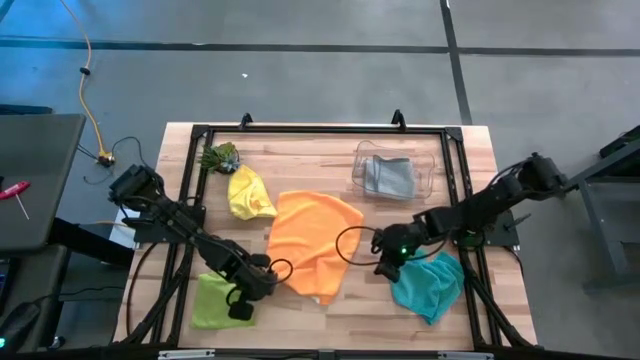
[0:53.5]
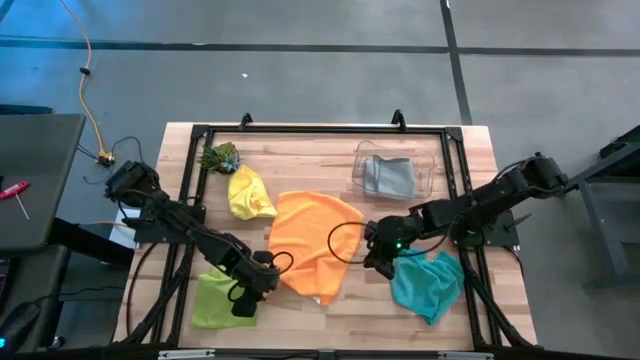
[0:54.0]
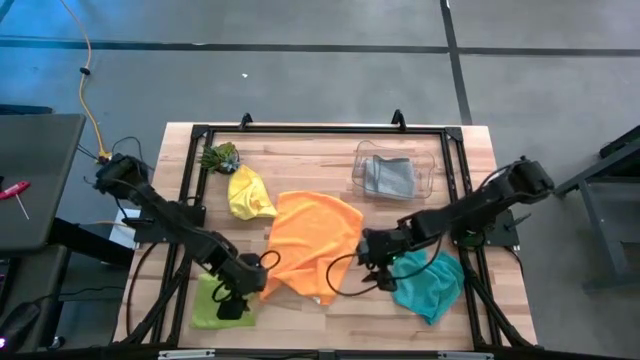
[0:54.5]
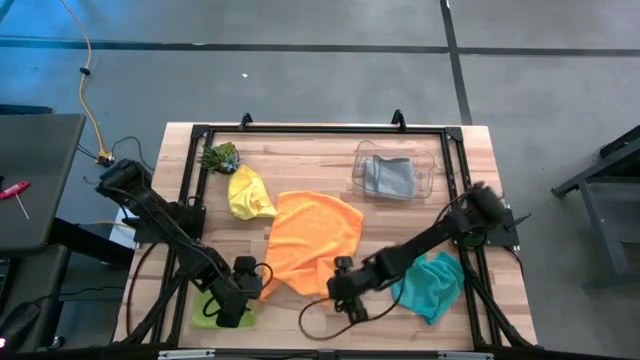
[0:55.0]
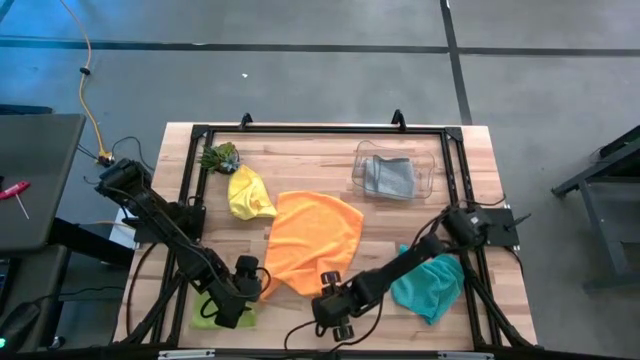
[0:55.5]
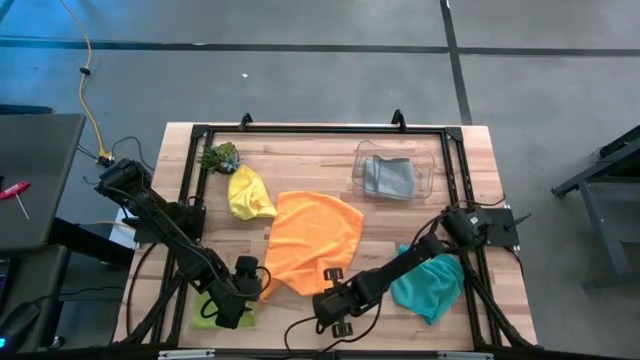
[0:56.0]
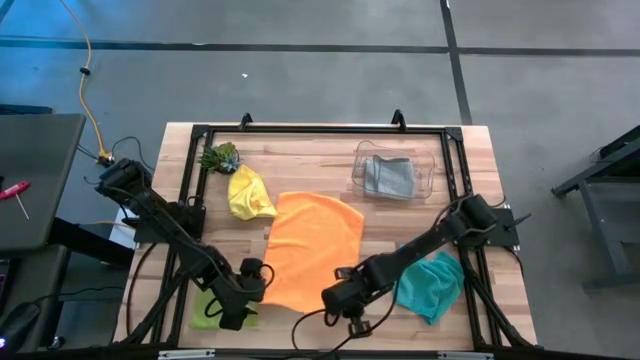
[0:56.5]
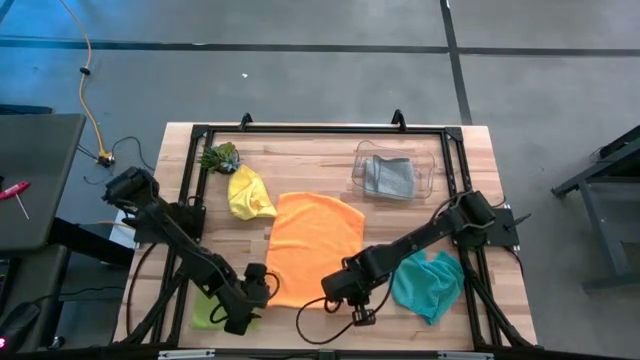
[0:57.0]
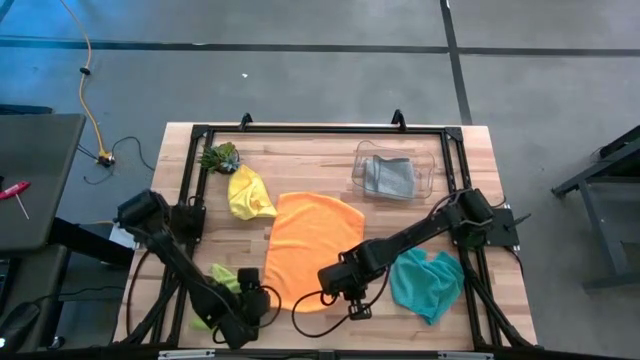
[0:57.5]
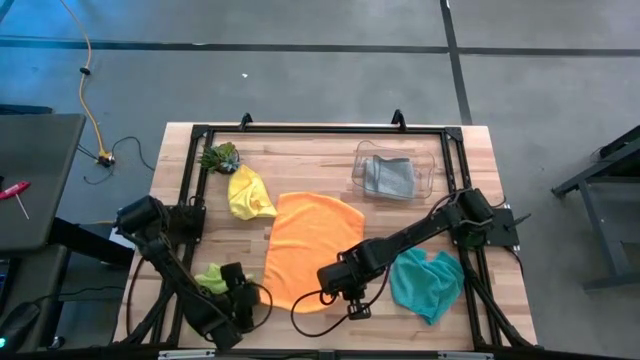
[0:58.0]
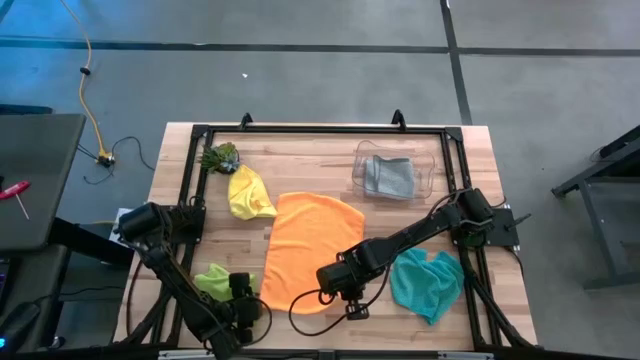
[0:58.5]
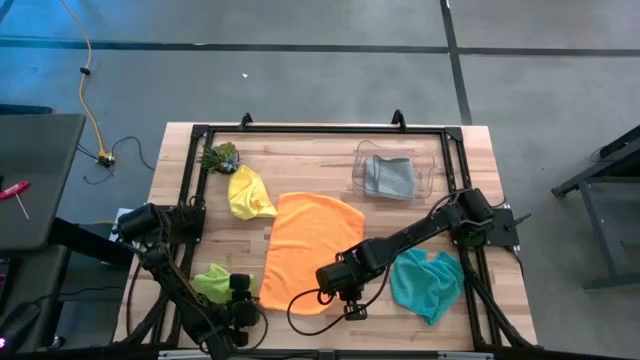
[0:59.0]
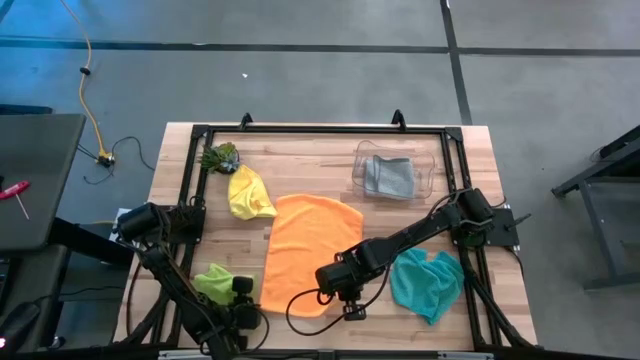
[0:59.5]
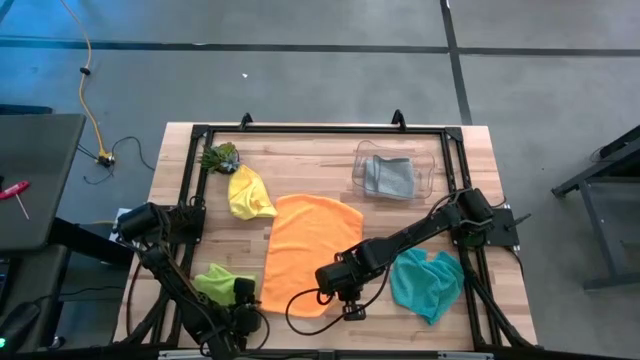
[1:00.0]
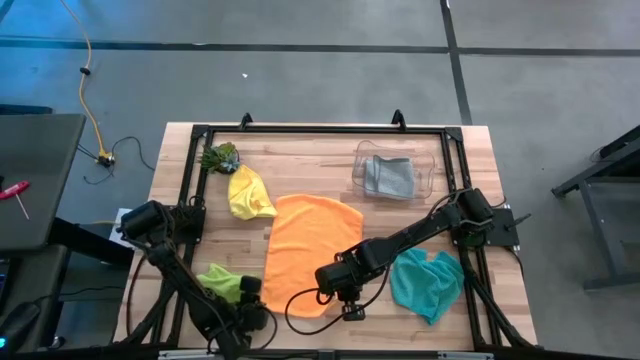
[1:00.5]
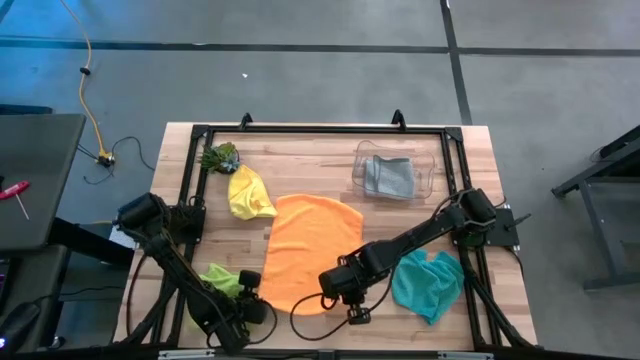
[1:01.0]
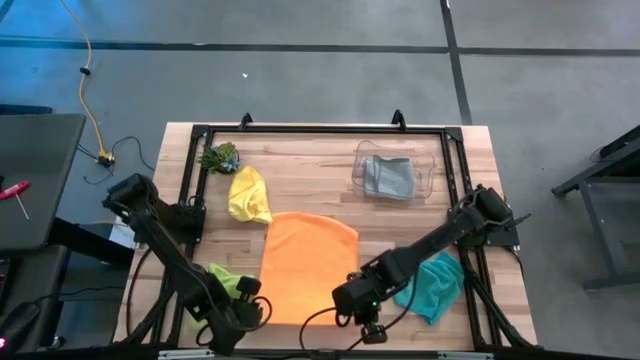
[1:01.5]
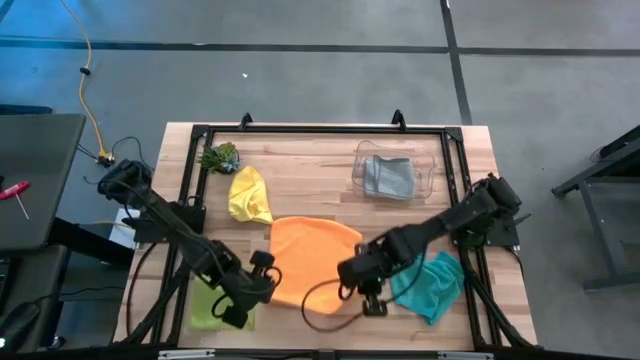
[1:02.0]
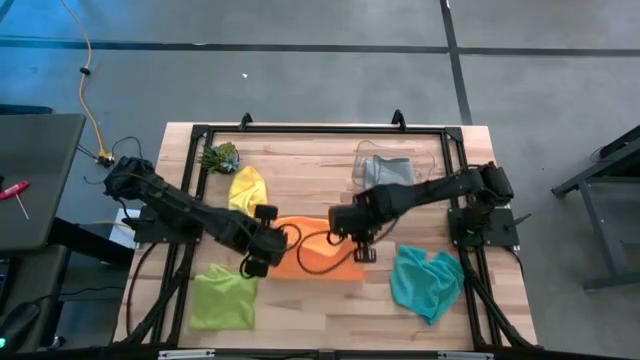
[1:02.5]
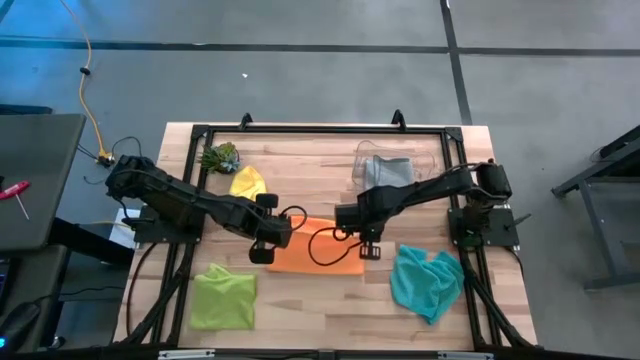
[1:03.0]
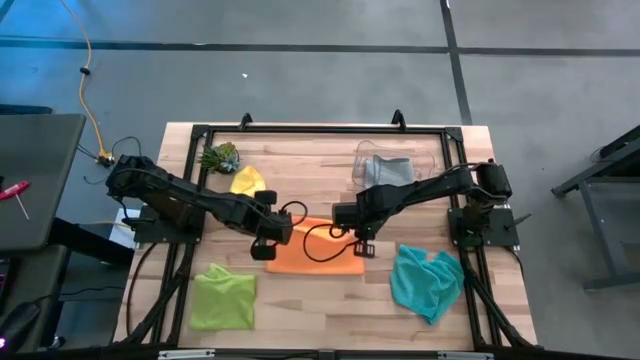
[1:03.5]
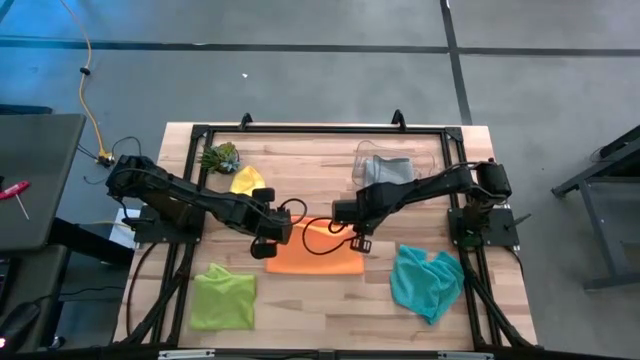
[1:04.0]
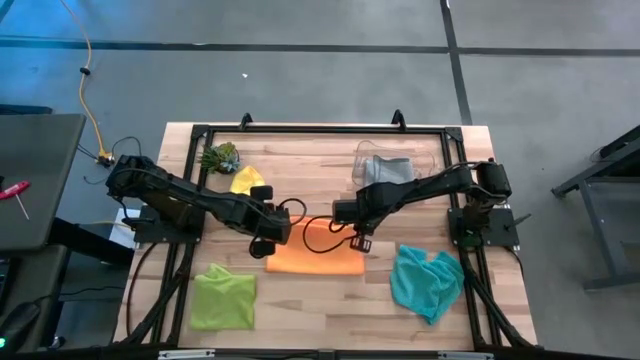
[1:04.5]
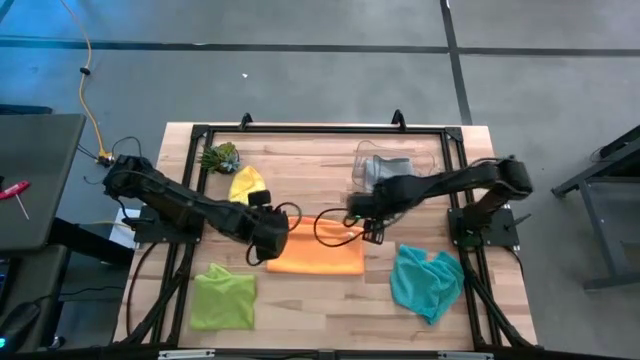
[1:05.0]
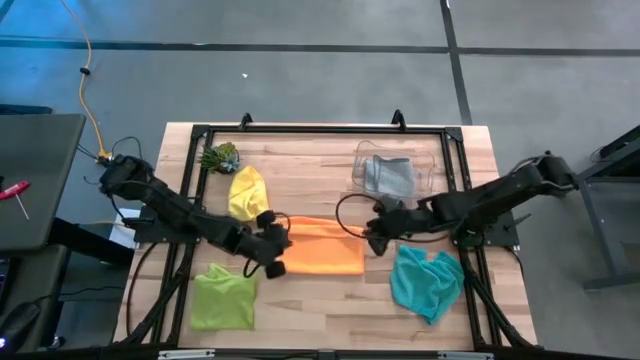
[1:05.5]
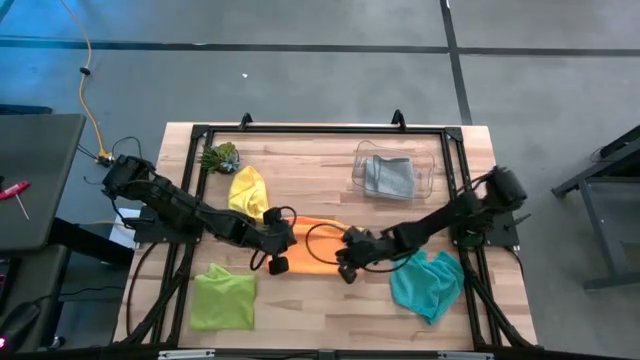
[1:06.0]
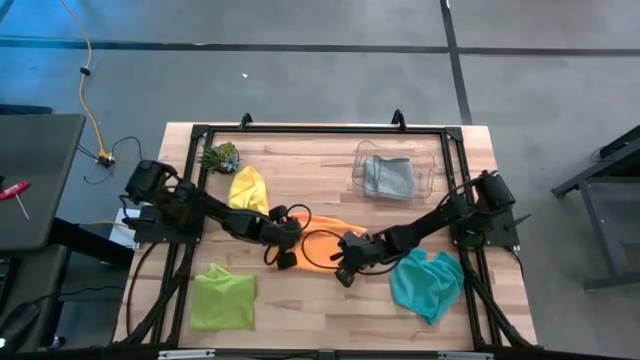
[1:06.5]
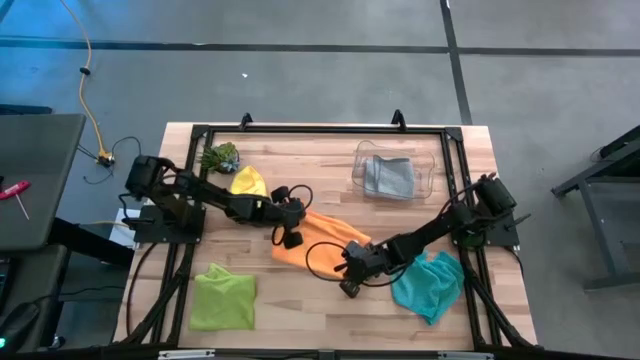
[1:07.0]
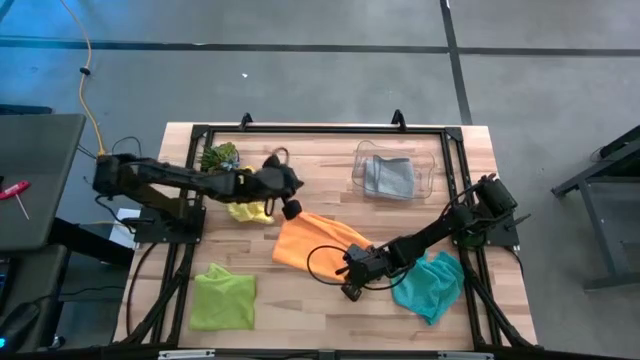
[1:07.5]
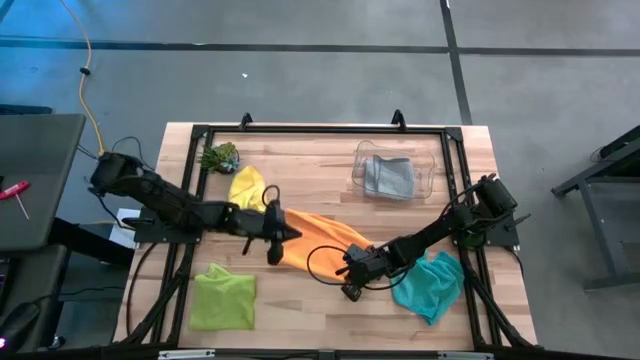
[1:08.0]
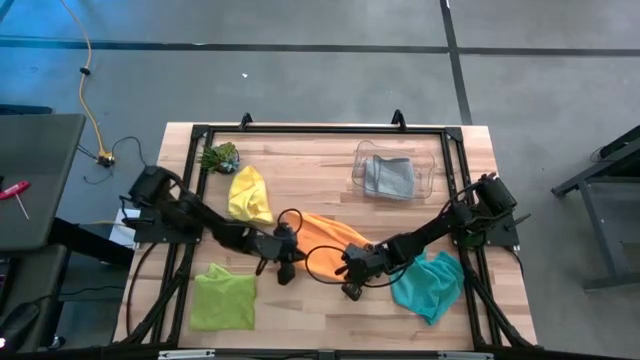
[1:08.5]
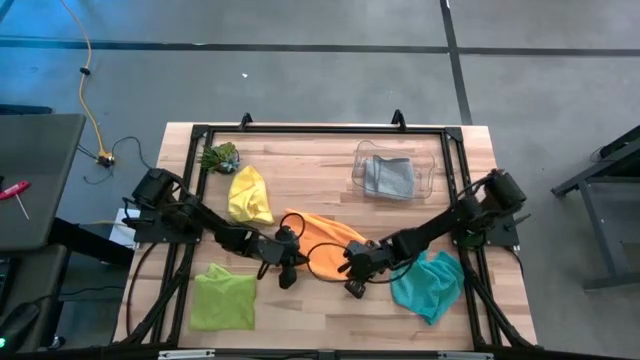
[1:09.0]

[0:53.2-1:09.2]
Task: Fold microfiber towels
Fold the orange microfiber towel

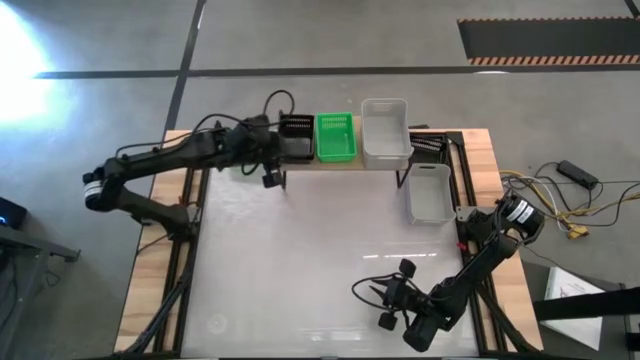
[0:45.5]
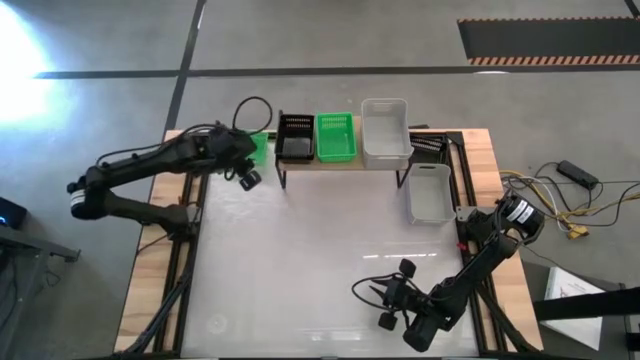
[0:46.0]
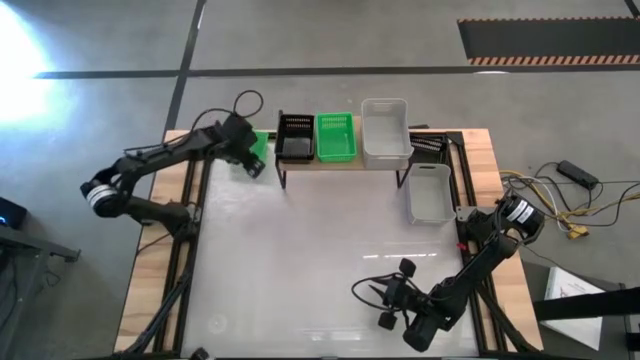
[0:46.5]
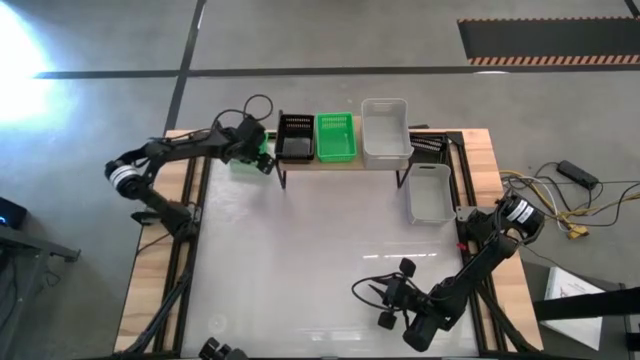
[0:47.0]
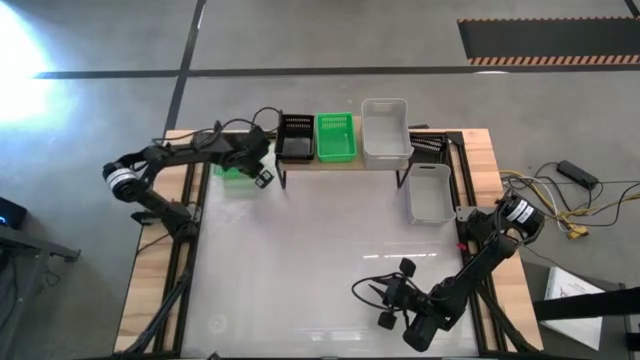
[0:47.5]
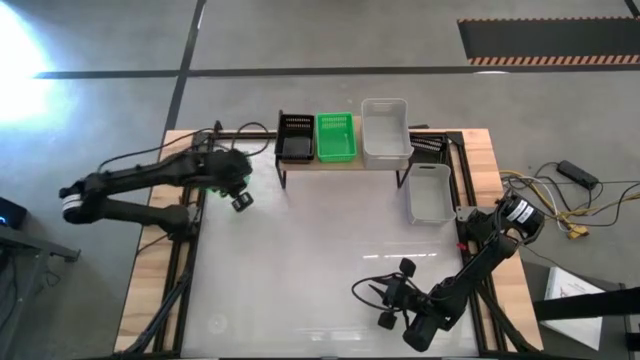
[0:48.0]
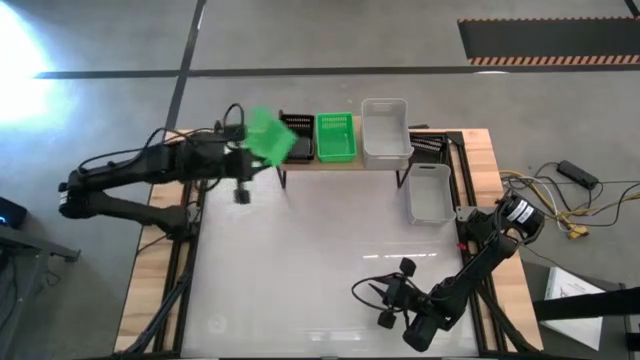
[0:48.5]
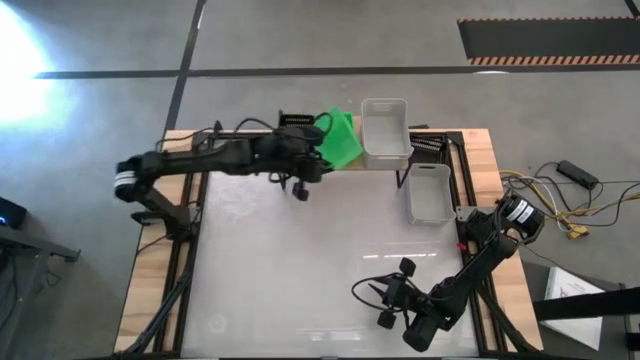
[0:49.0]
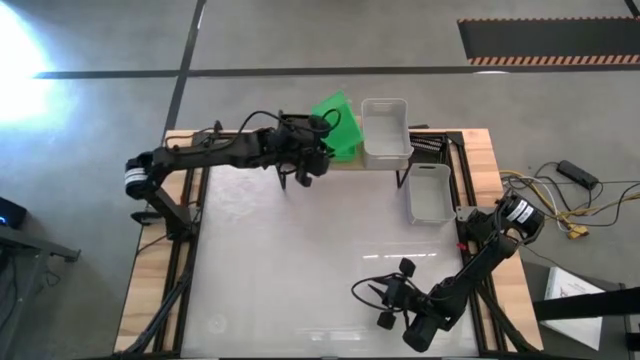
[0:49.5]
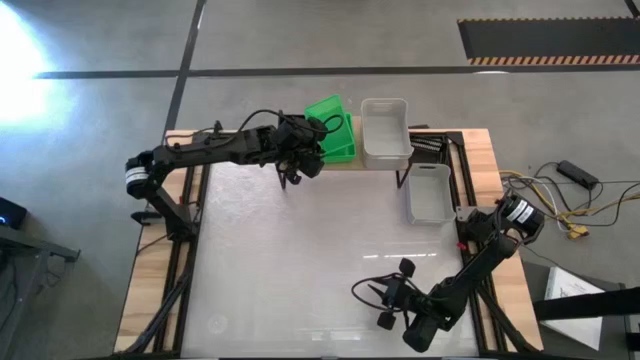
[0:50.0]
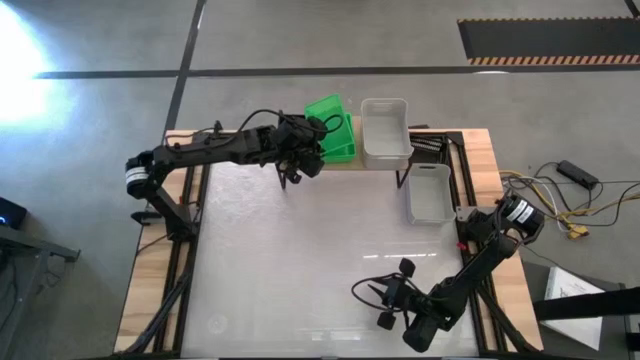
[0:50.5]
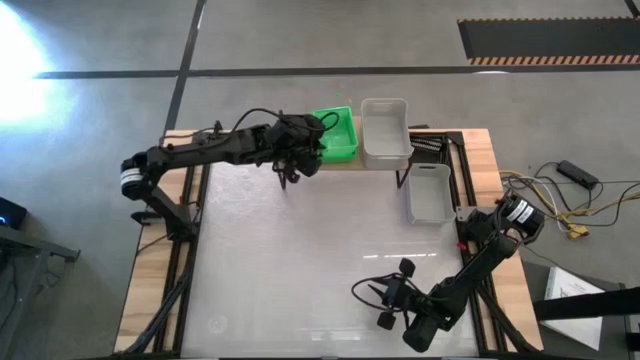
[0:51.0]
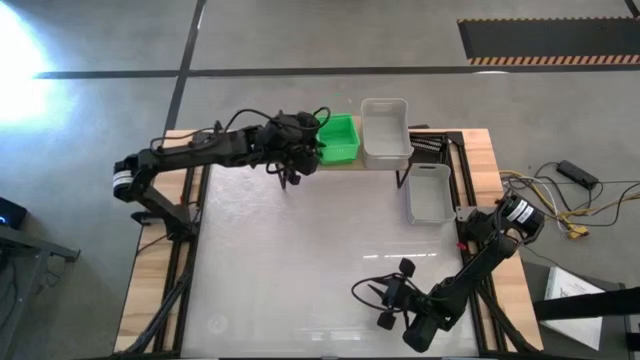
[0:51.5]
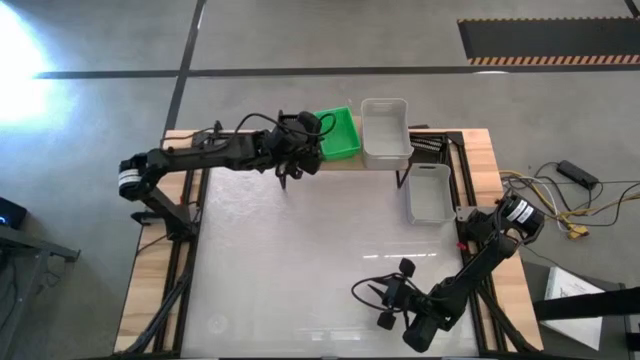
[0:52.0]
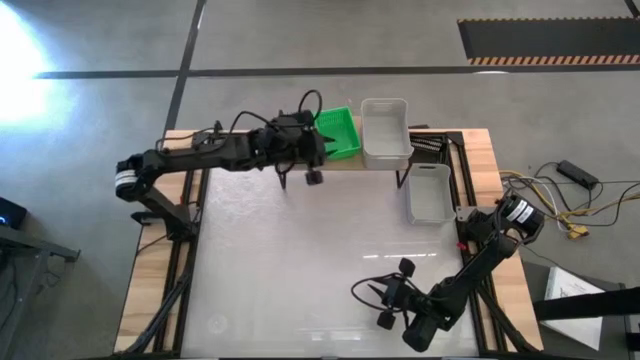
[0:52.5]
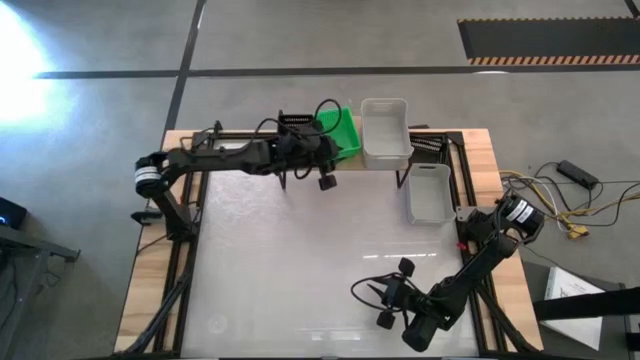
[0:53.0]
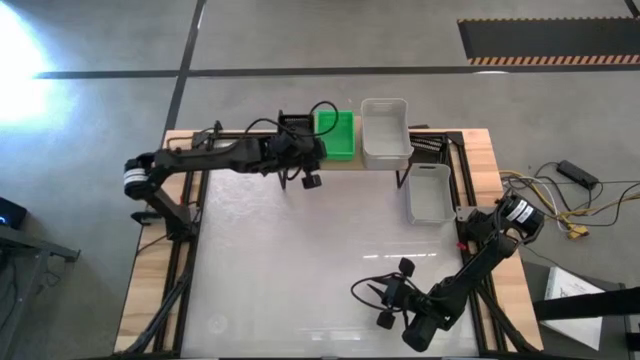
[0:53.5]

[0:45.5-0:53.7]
Task: Stack baskets on shelf by color
Stack the green bin on top of the green bin on the shelf
